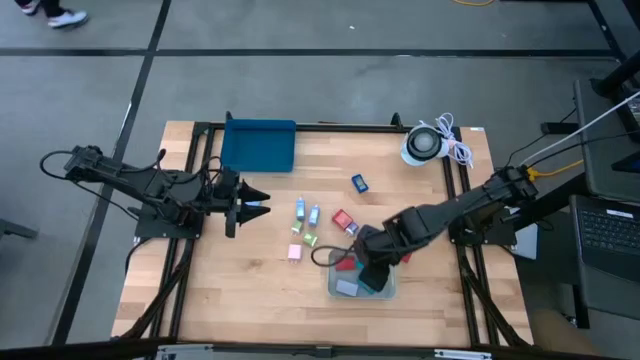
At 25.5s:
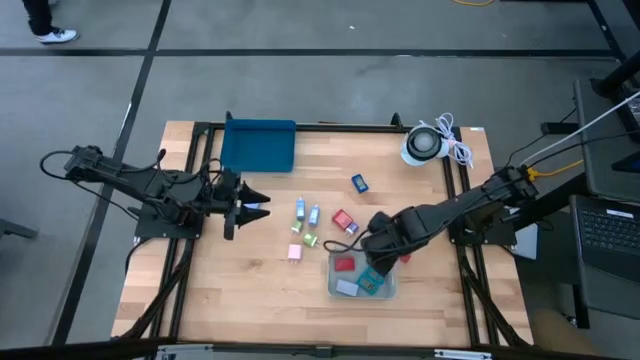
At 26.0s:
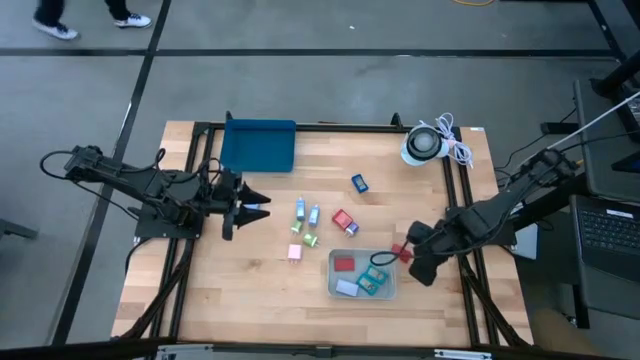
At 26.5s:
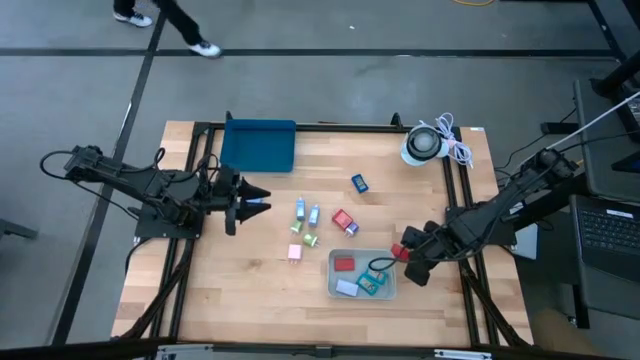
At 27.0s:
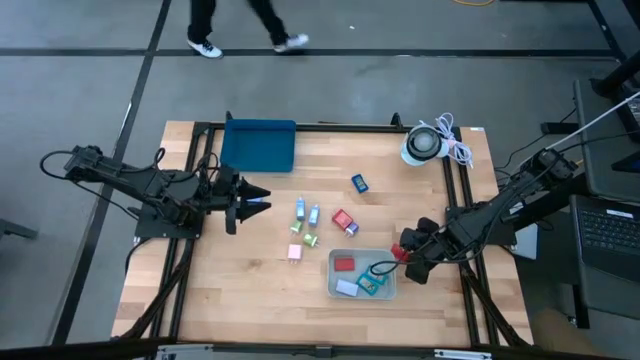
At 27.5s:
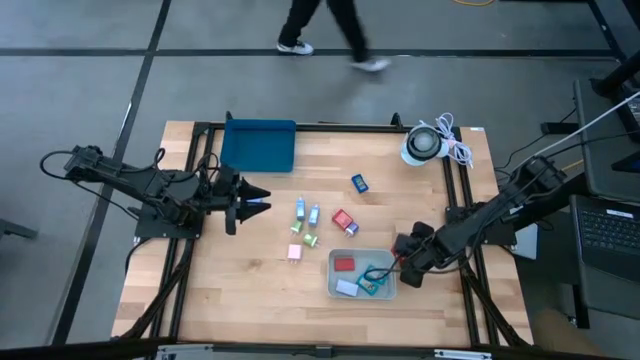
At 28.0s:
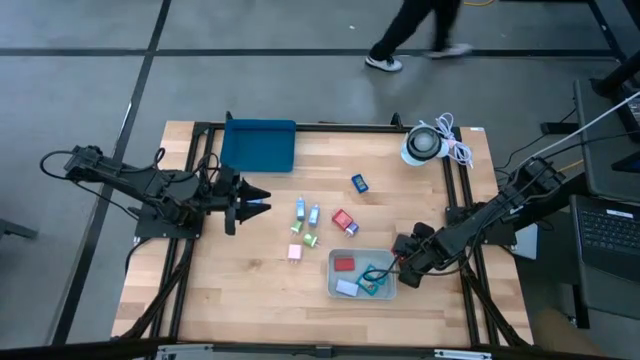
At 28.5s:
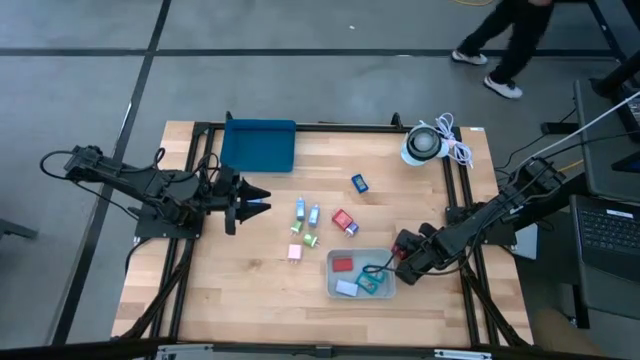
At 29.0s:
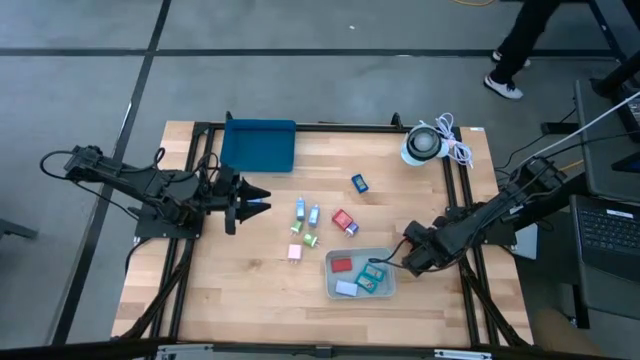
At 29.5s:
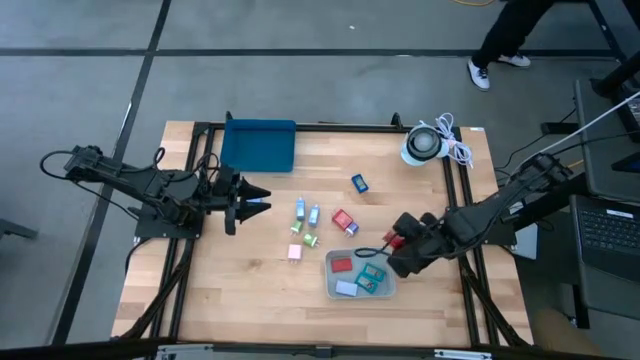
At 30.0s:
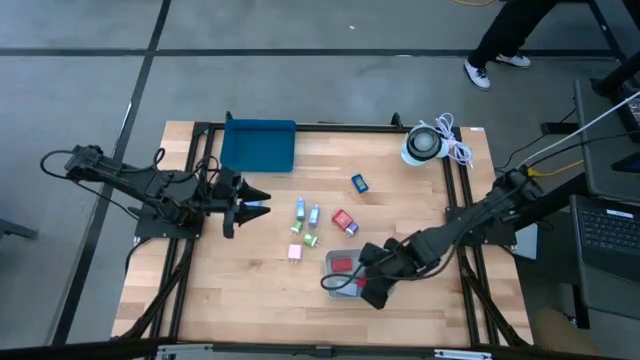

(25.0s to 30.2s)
Task: Pick & Place Office items
Put the red digital clock into the gray bin

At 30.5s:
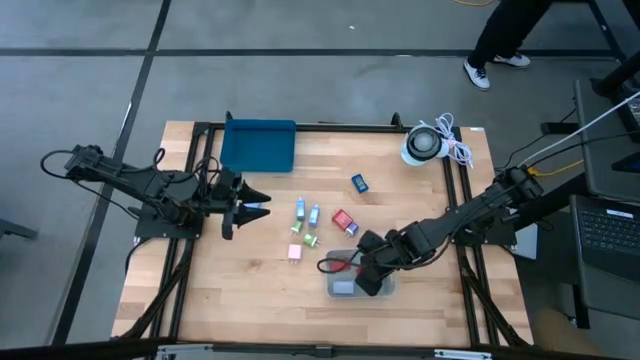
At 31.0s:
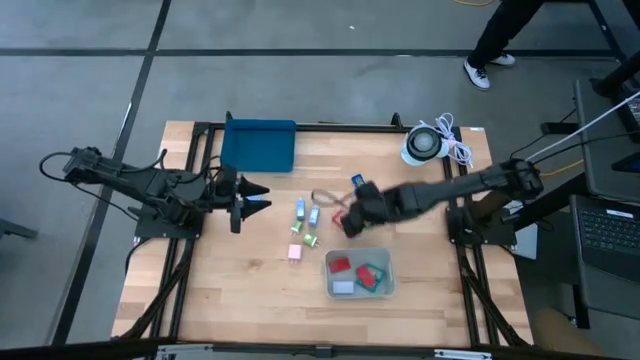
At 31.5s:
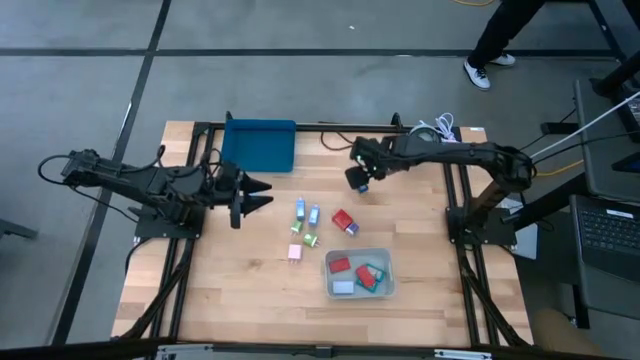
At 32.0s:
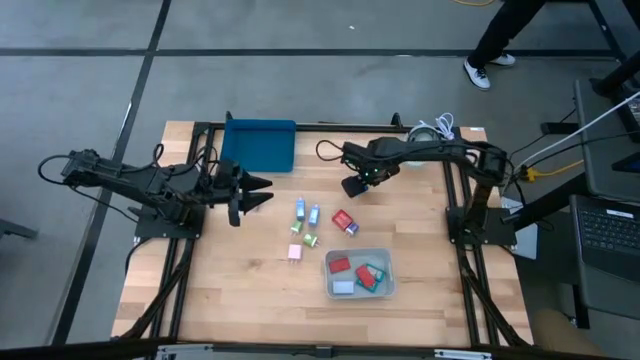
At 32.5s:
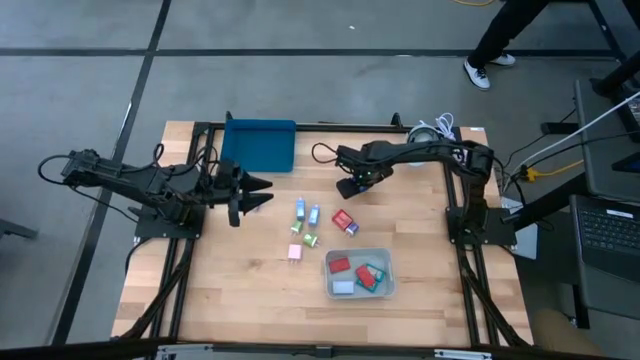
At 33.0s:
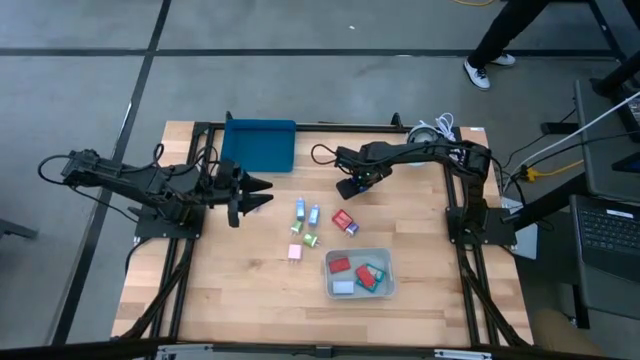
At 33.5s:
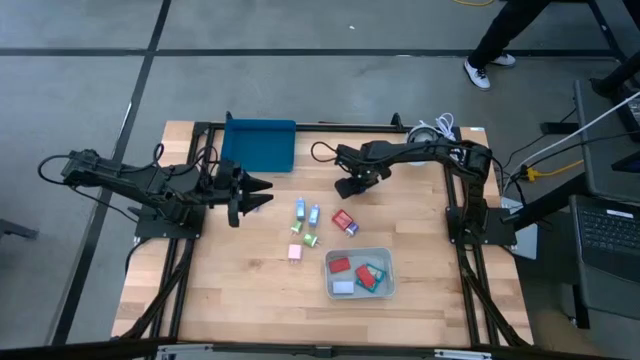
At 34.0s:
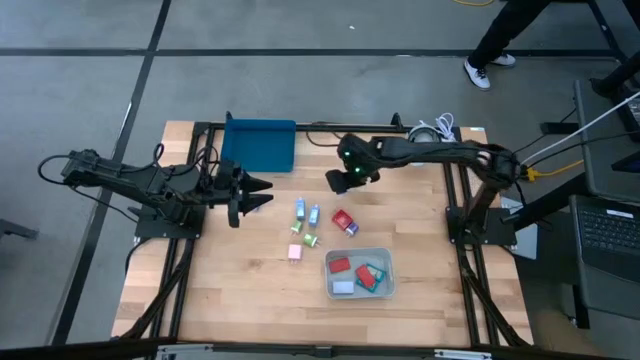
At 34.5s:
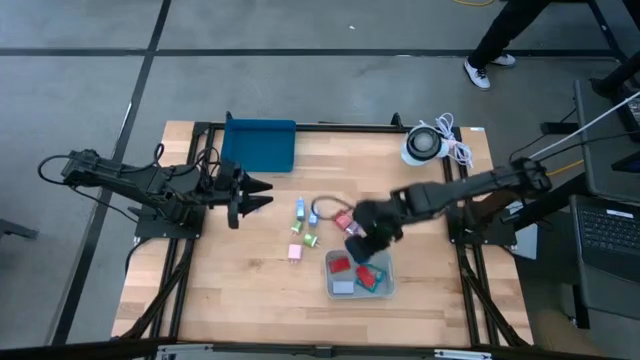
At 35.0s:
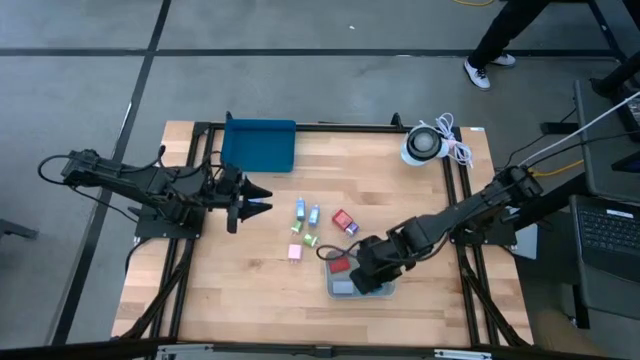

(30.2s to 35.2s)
Put the dark blue digital clock into the gray bin

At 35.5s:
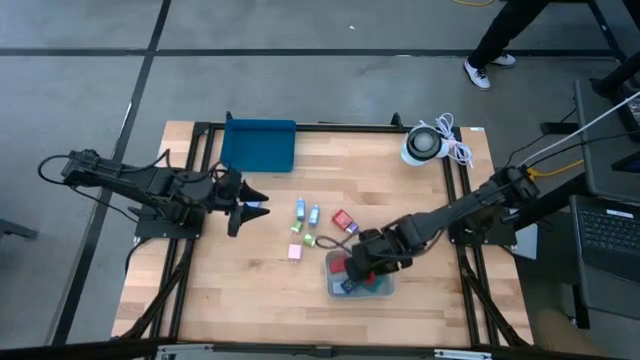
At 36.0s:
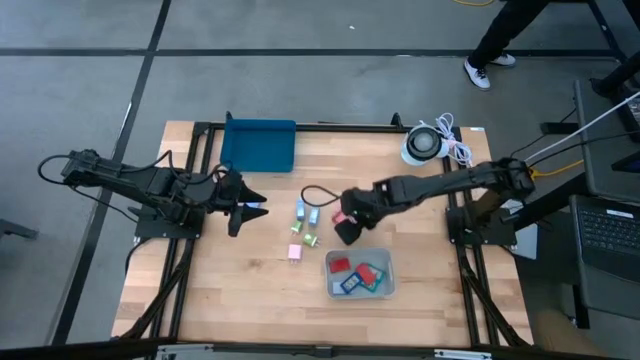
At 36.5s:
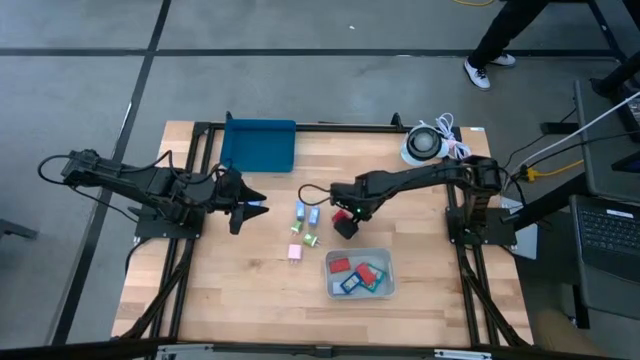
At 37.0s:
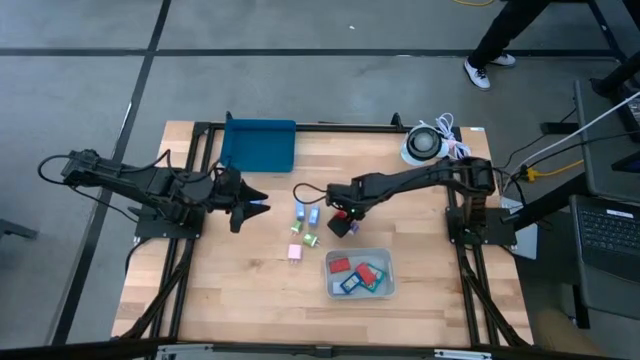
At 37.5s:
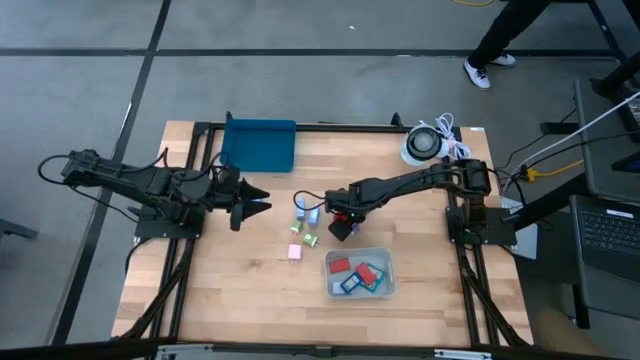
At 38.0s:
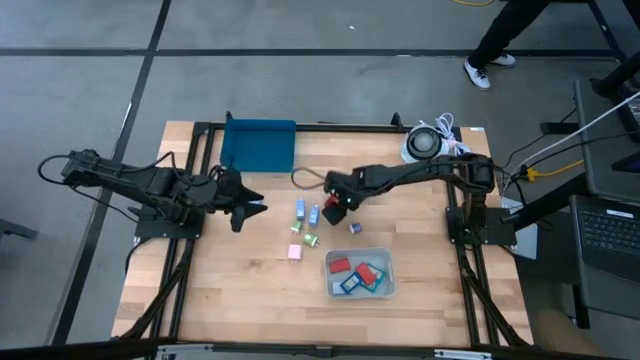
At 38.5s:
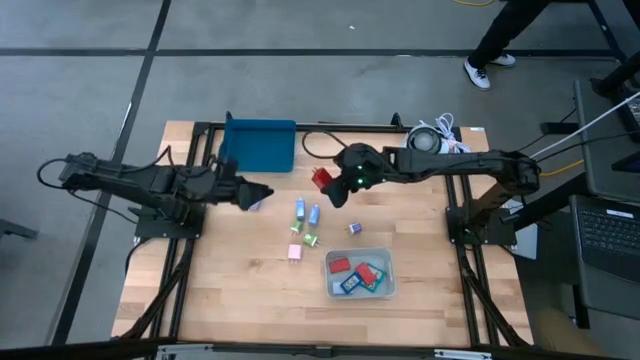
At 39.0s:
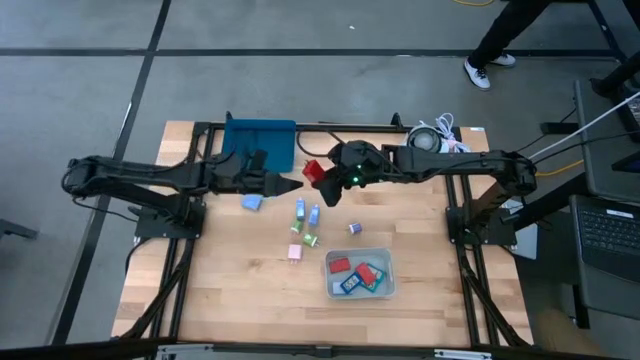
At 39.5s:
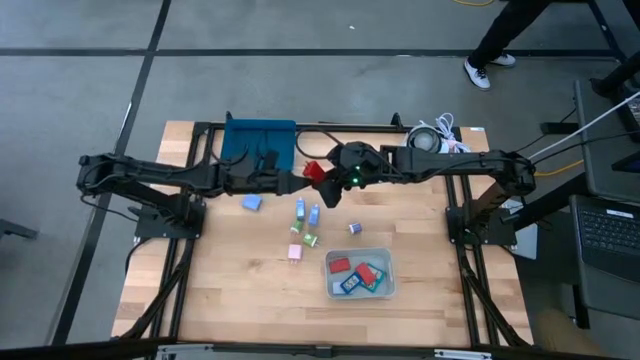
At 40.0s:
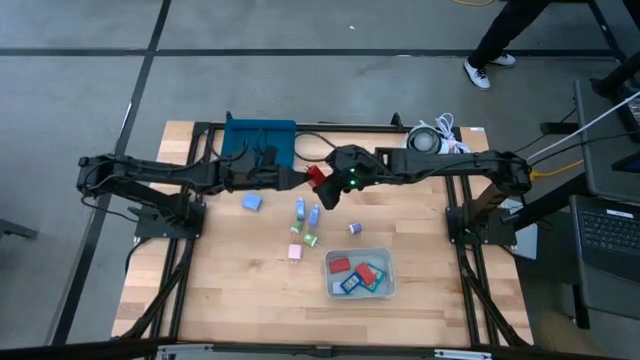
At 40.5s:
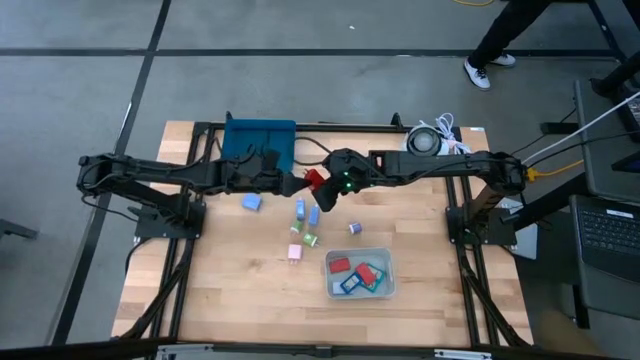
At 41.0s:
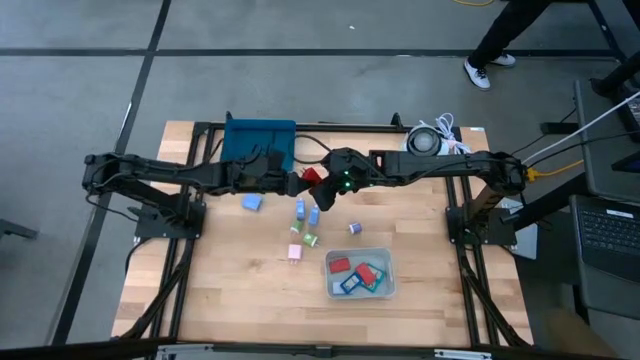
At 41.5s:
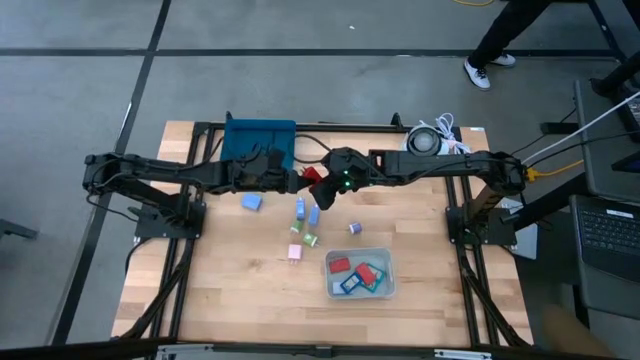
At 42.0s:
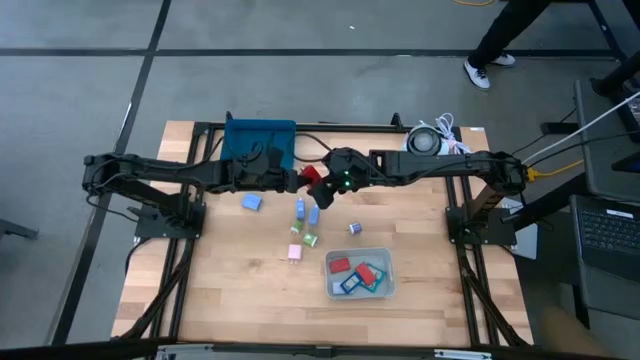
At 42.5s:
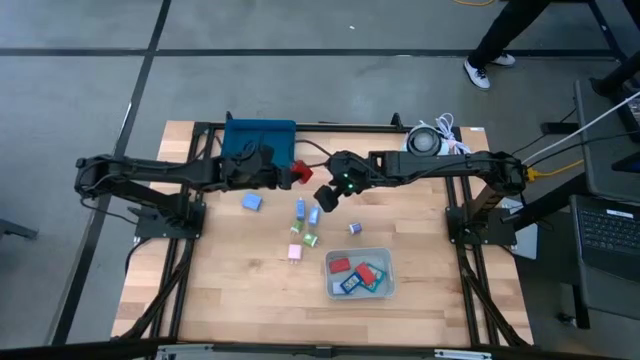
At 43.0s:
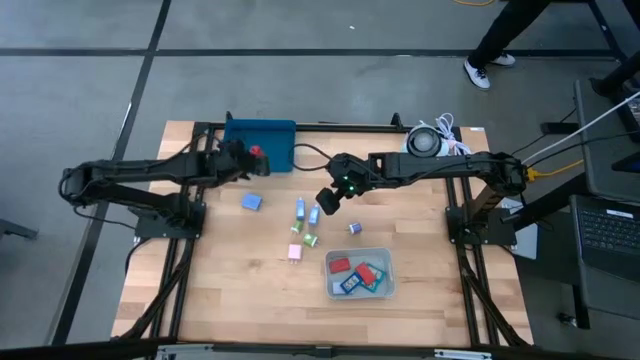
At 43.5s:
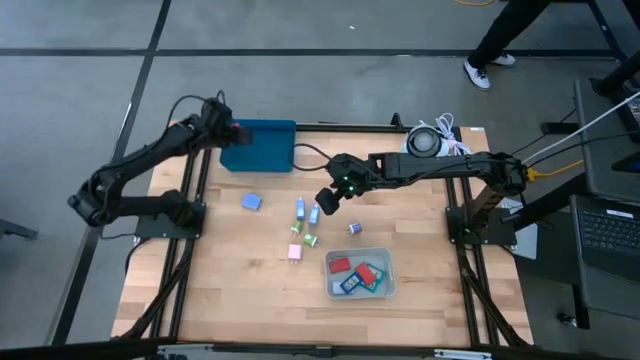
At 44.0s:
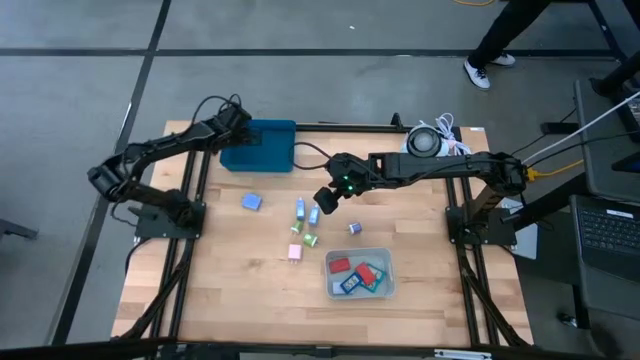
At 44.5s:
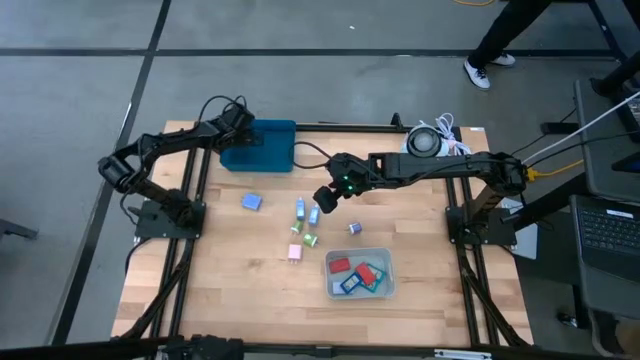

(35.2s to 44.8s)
Put the red charger adapter into the blue bin

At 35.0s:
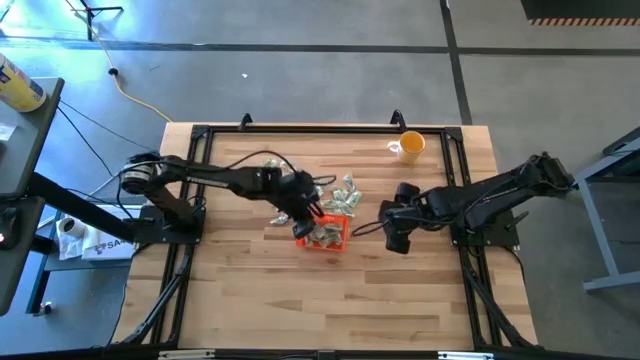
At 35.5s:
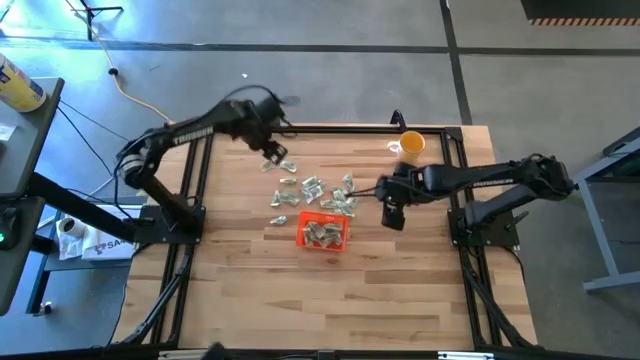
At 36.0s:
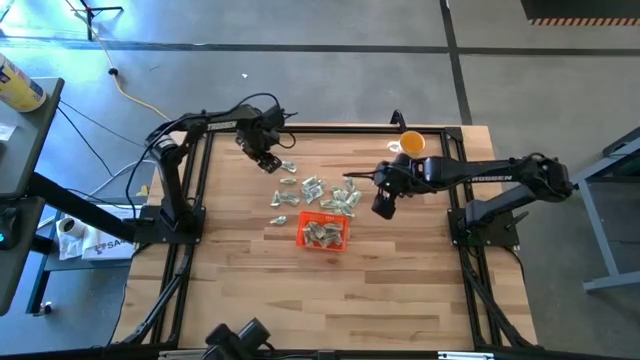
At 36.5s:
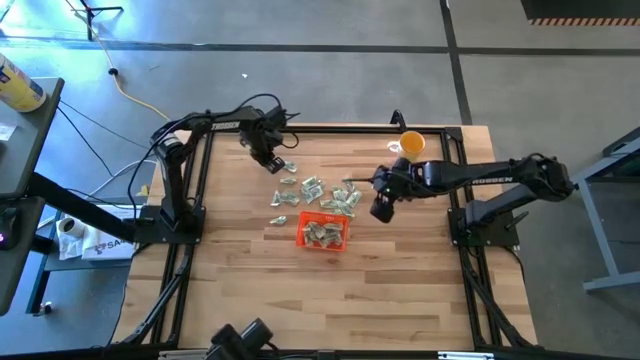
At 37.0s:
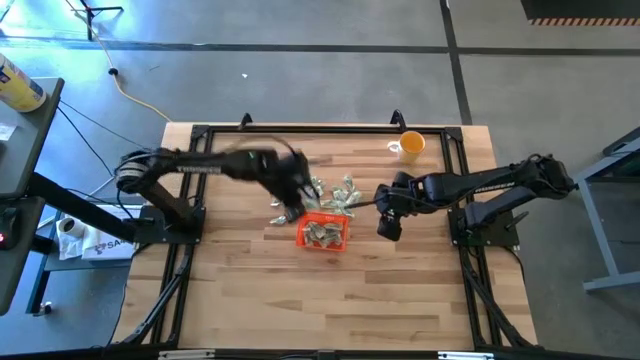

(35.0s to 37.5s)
Task: Pick and place Stevia / Truvia into bins
Put the stevia packet into the orange bin
